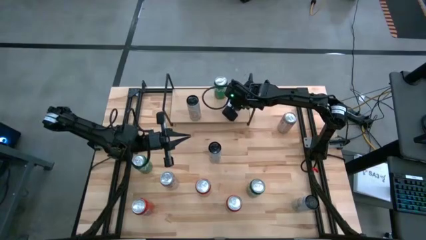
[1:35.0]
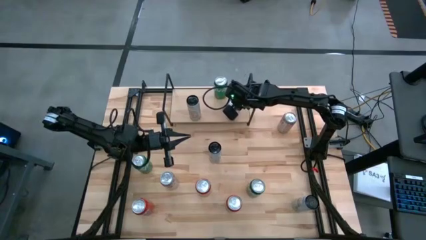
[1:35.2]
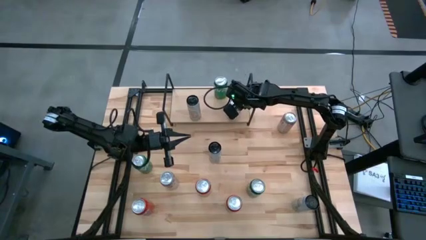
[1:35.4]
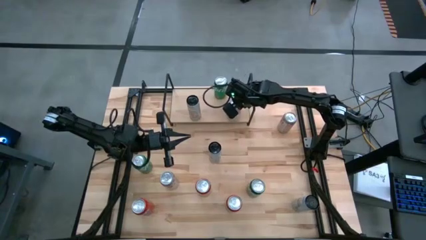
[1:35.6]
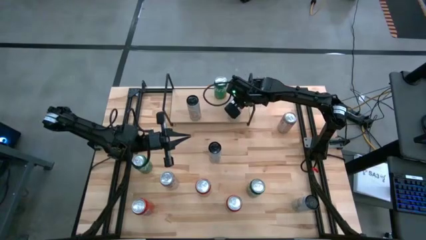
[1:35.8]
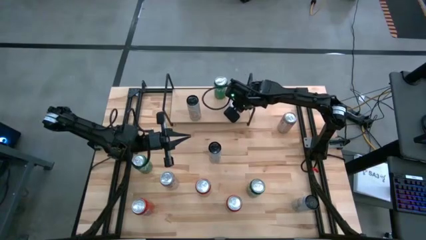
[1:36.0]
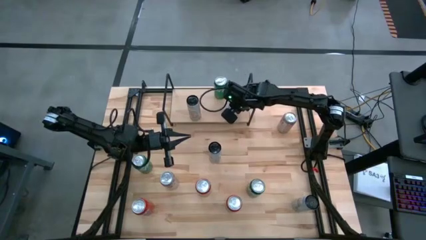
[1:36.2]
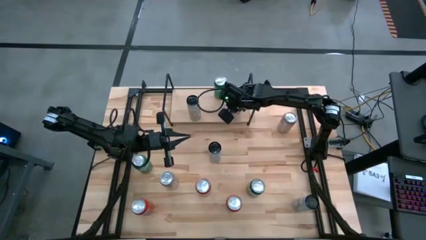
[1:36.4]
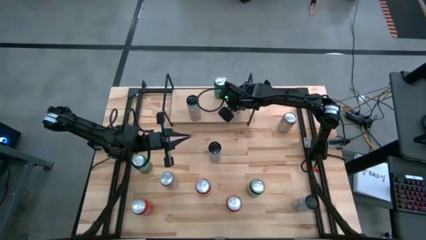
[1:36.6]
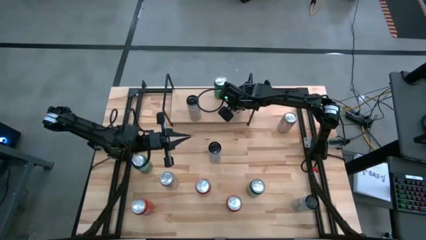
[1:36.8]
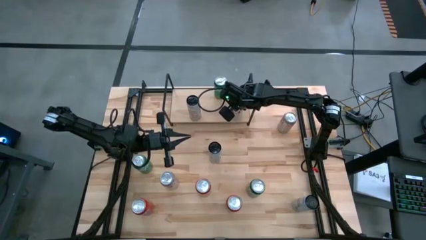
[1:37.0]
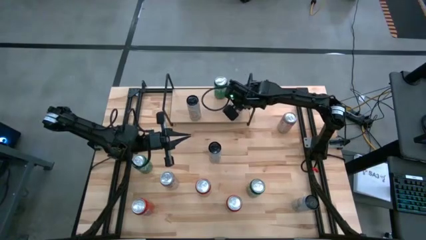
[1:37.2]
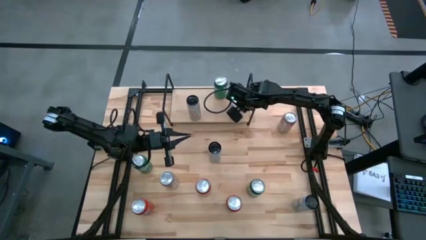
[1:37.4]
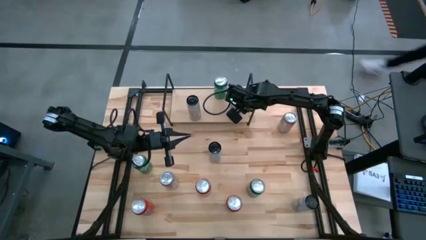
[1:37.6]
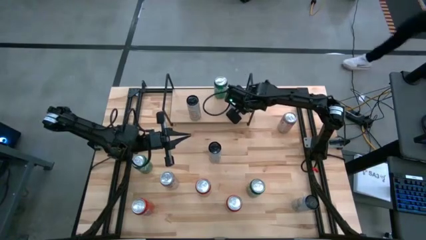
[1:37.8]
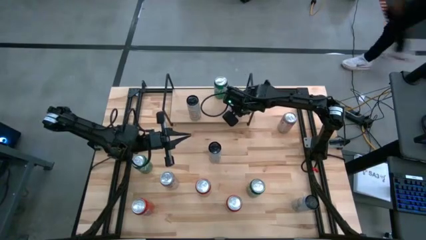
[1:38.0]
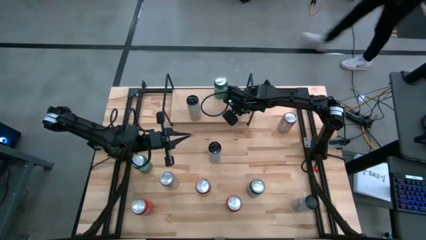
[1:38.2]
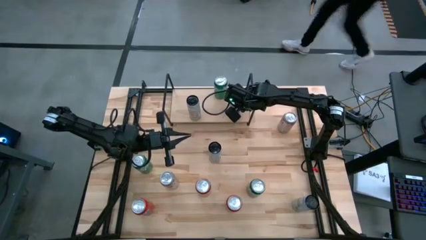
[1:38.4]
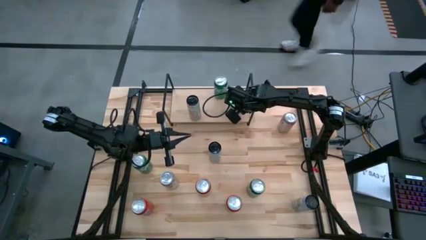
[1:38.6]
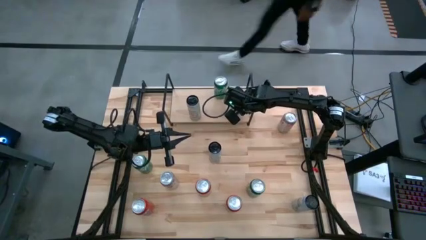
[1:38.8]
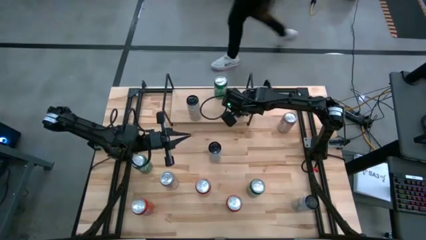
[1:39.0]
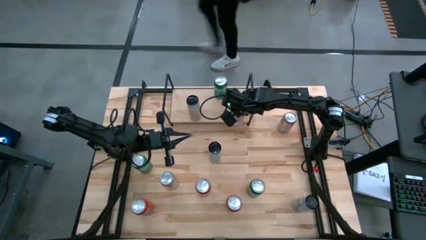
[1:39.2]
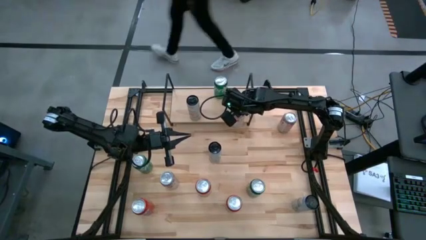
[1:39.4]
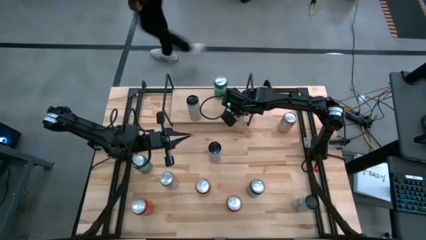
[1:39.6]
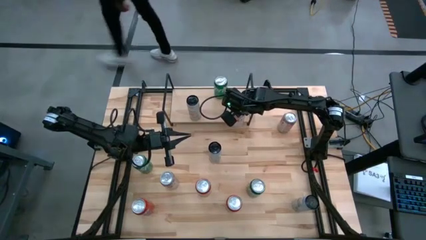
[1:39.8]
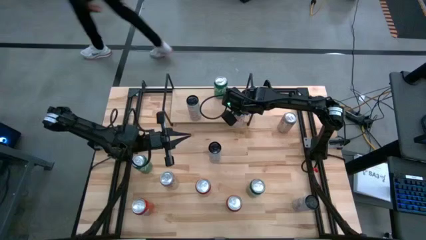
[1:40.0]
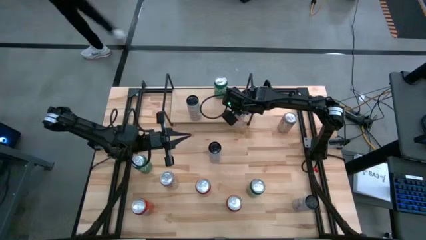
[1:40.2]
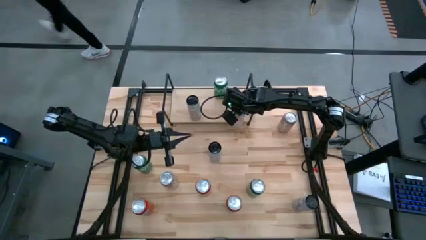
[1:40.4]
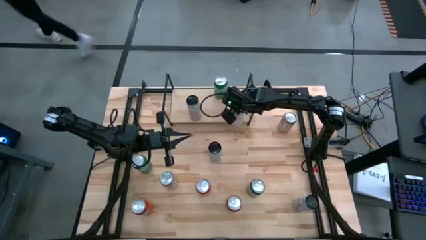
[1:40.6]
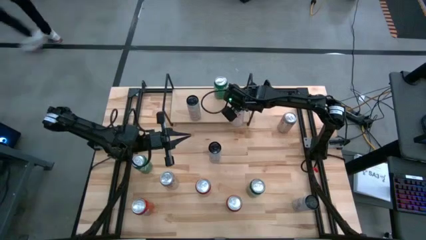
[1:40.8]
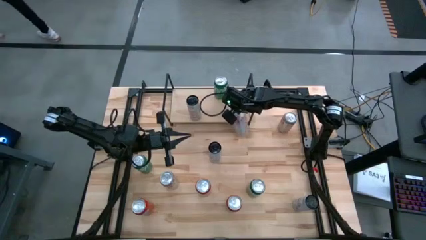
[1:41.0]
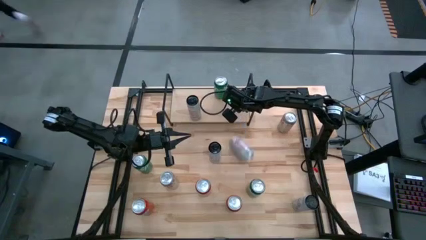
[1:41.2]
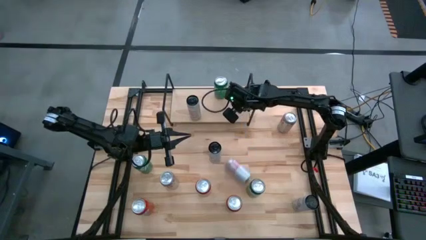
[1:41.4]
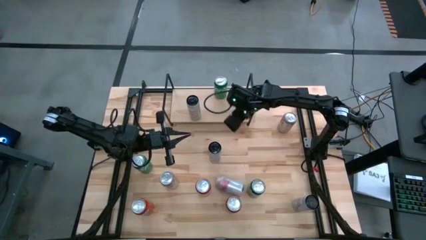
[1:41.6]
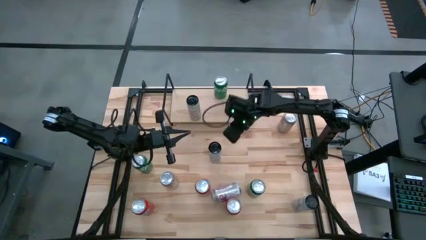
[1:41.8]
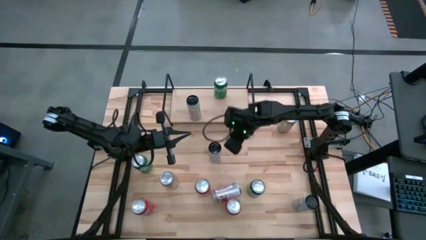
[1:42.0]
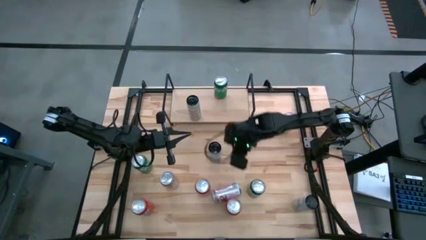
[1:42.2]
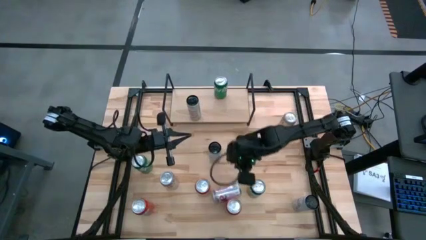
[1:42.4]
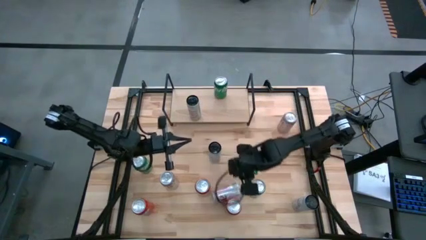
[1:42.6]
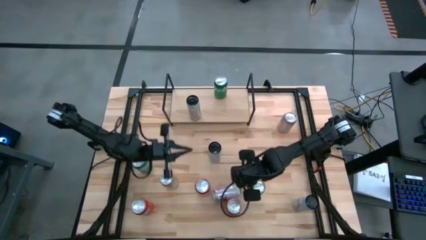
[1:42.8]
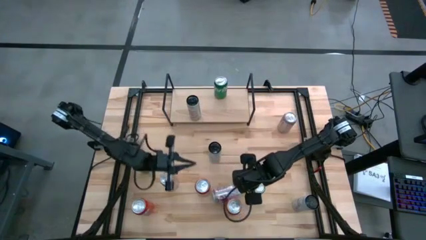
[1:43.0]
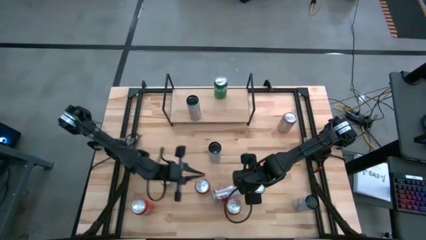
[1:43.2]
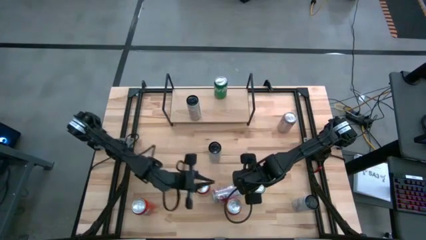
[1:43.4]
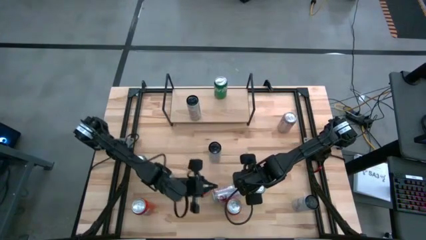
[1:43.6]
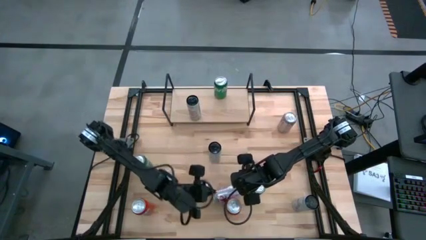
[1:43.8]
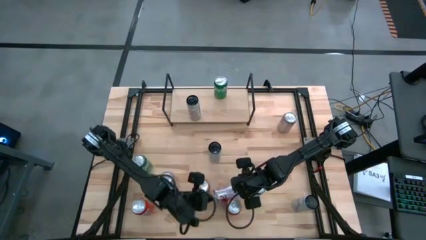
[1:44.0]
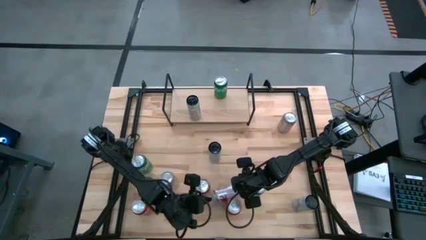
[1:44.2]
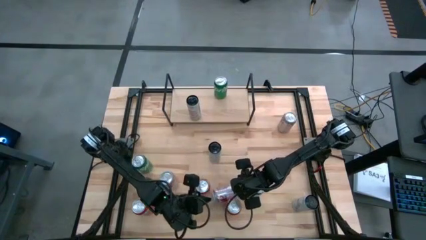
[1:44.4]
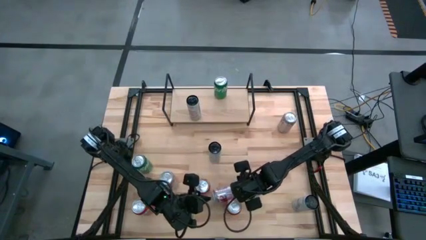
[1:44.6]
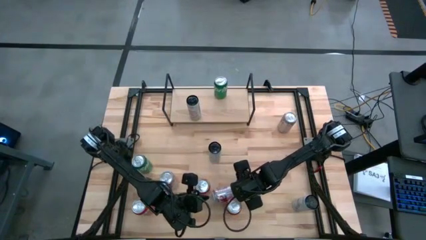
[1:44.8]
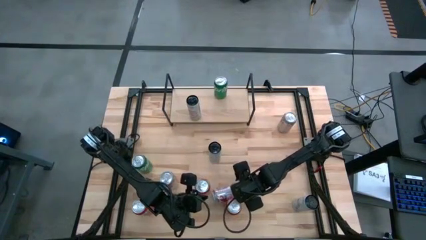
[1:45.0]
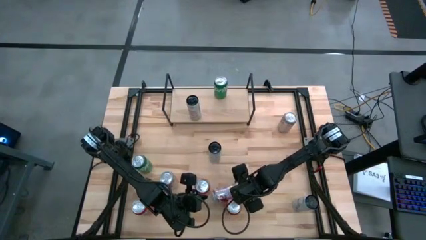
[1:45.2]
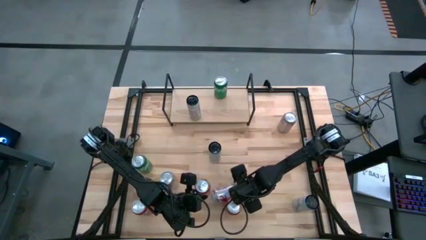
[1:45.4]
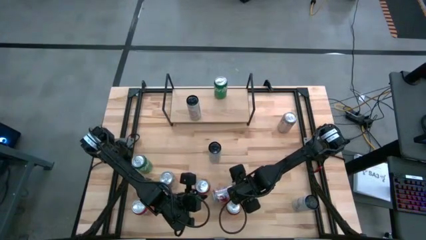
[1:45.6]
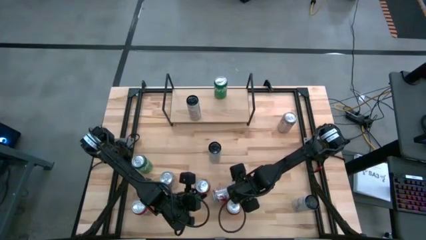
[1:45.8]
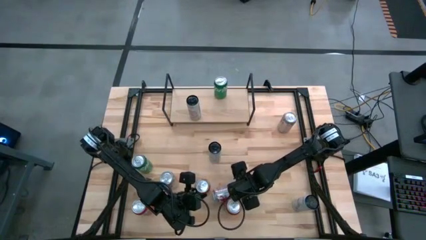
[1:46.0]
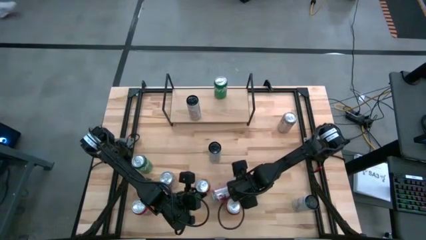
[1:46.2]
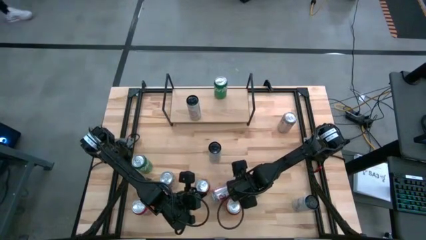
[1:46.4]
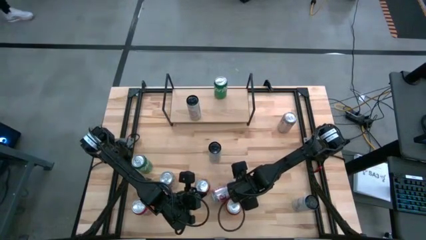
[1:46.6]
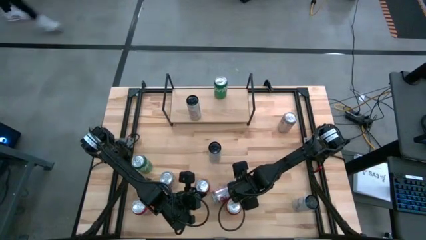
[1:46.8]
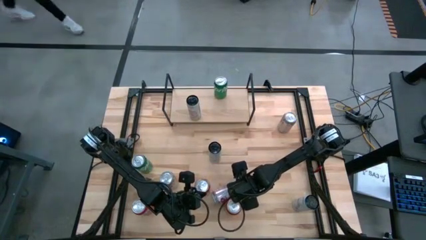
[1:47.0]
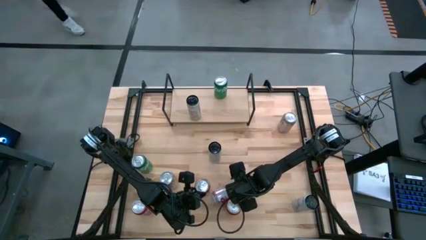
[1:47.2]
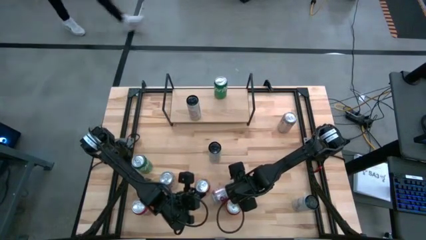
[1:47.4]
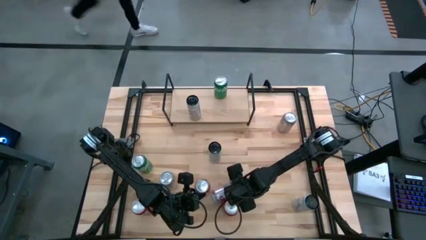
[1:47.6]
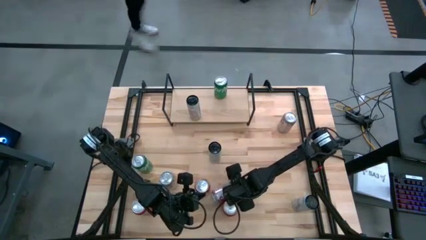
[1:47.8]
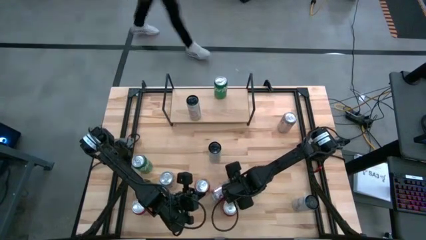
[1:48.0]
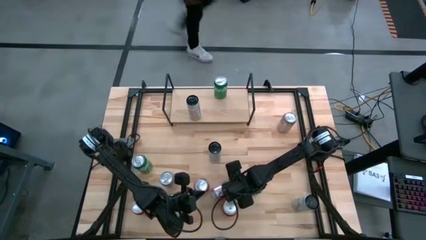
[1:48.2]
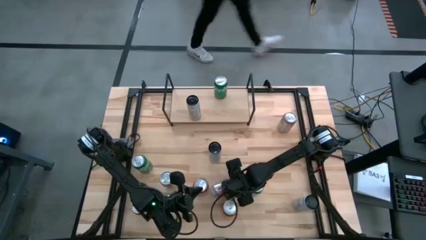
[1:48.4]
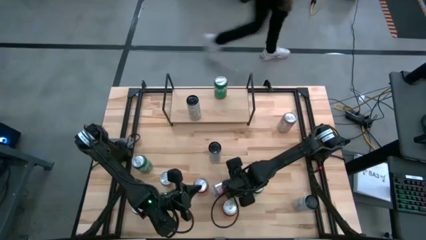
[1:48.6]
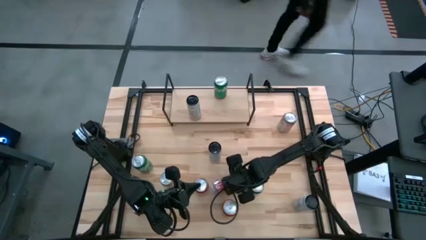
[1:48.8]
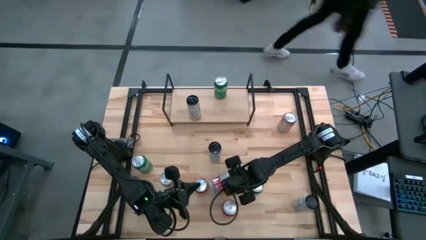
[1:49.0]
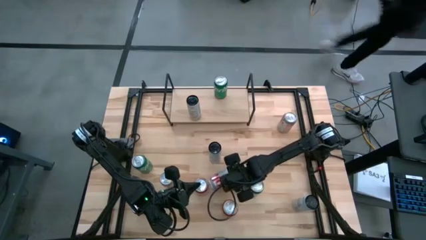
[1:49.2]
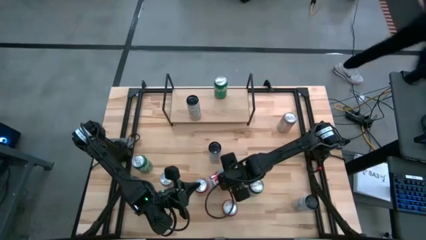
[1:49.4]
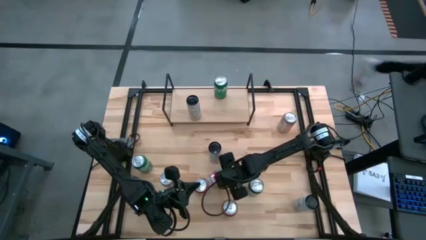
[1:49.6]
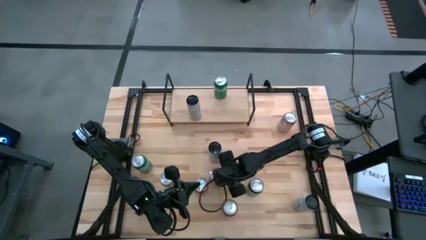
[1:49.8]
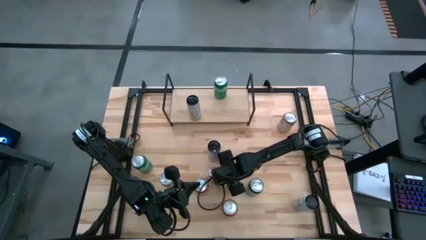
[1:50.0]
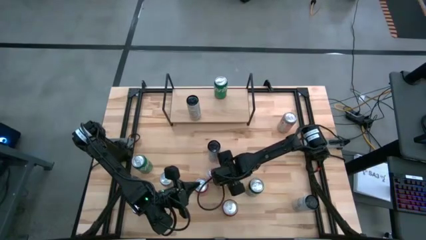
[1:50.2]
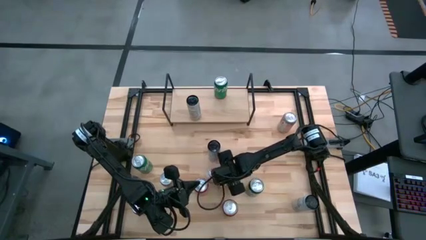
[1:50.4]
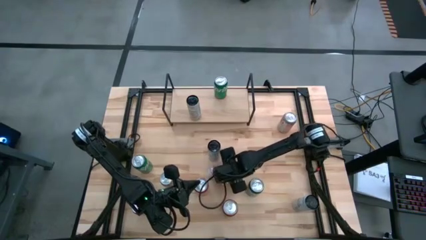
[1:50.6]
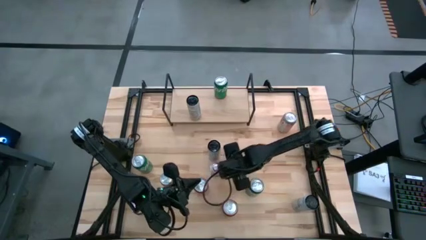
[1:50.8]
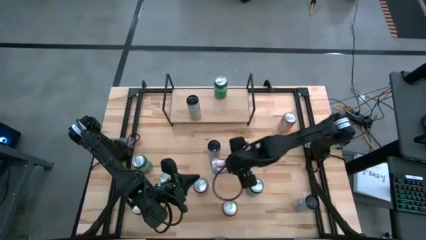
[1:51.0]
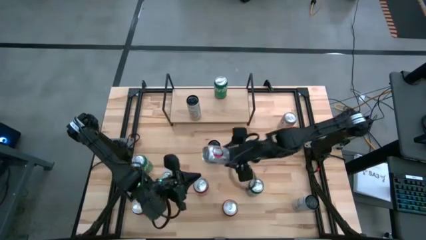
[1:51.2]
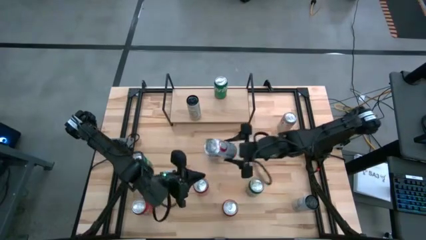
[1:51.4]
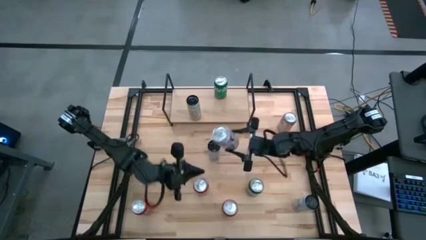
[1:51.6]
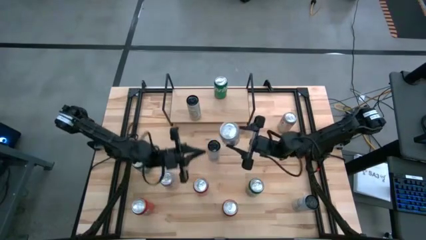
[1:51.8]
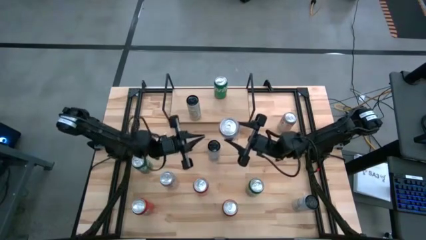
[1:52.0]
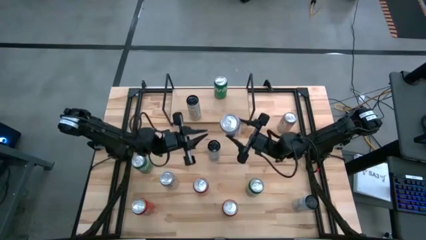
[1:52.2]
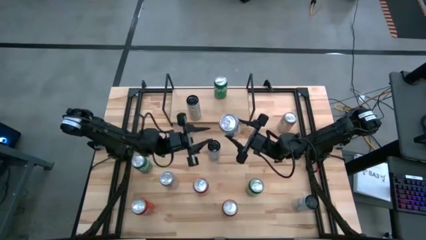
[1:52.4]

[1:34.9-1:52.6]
Task: Sort soda cans
Put the middle red silver soda can on the shelf
